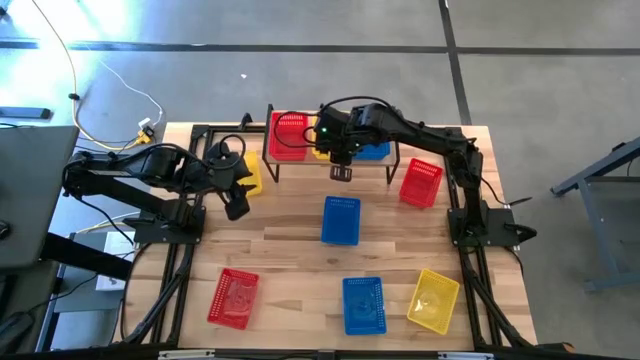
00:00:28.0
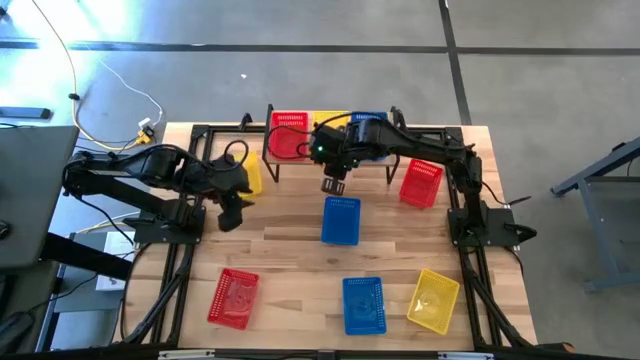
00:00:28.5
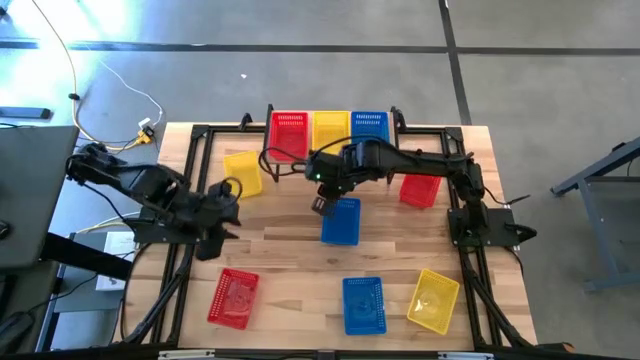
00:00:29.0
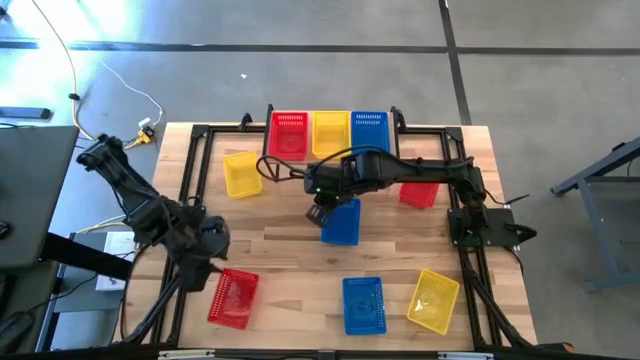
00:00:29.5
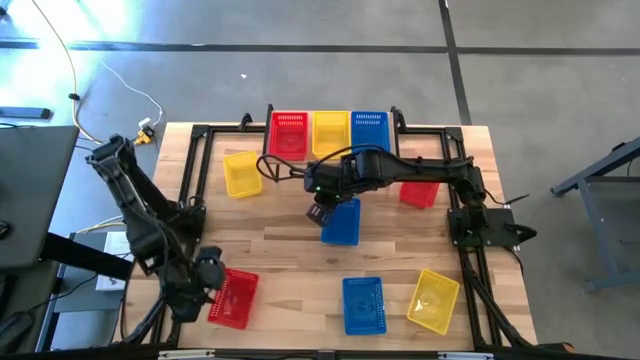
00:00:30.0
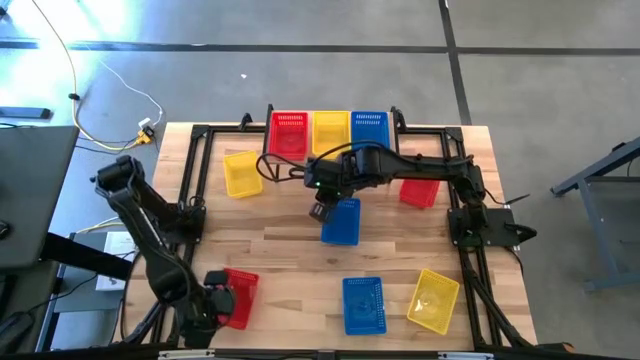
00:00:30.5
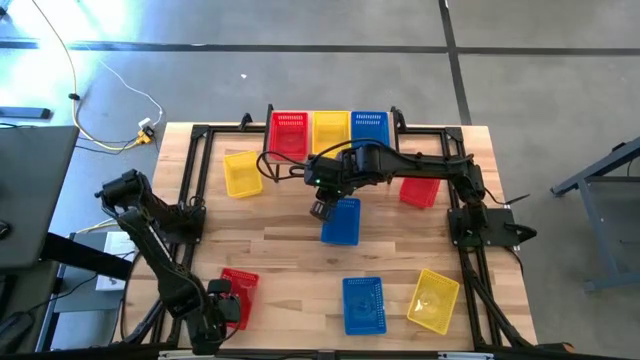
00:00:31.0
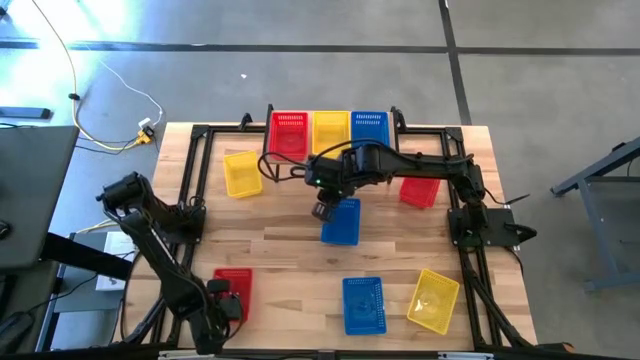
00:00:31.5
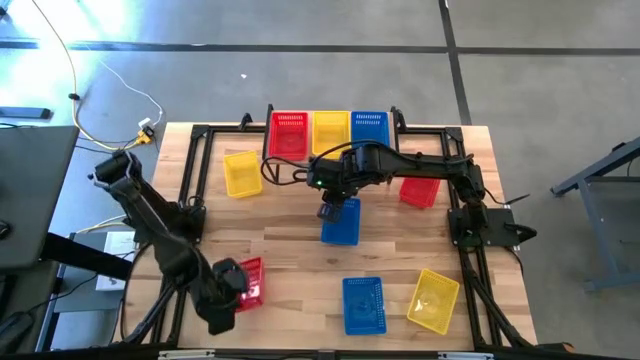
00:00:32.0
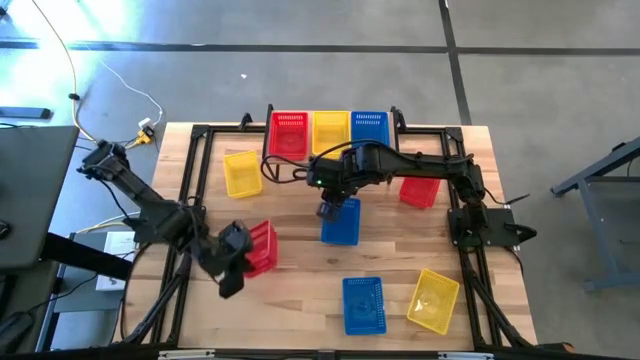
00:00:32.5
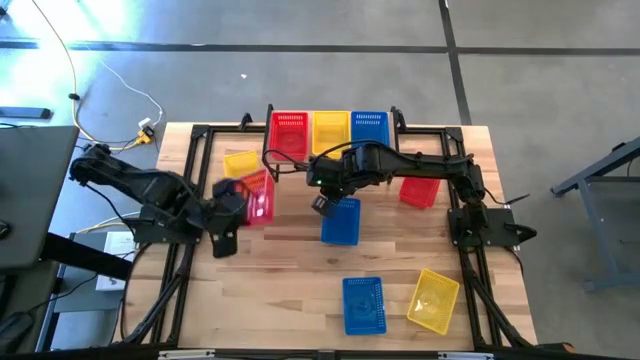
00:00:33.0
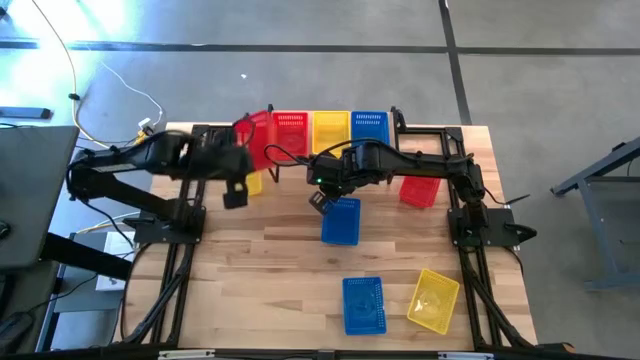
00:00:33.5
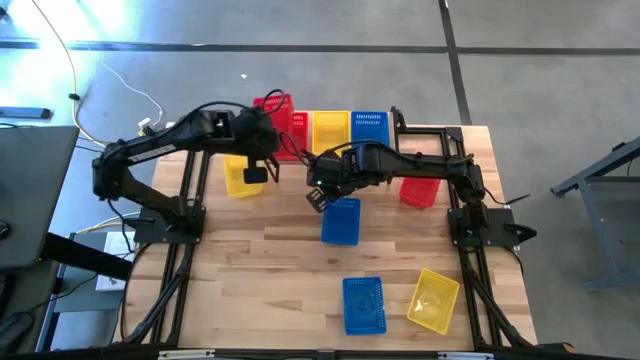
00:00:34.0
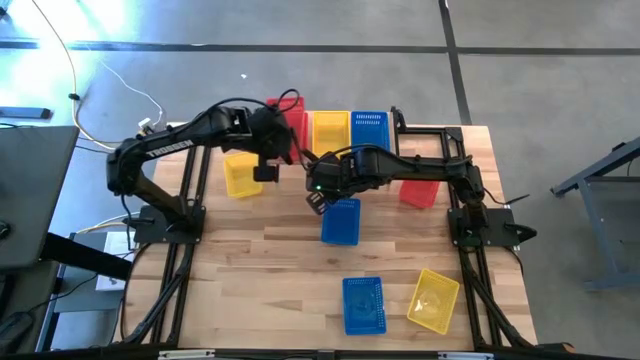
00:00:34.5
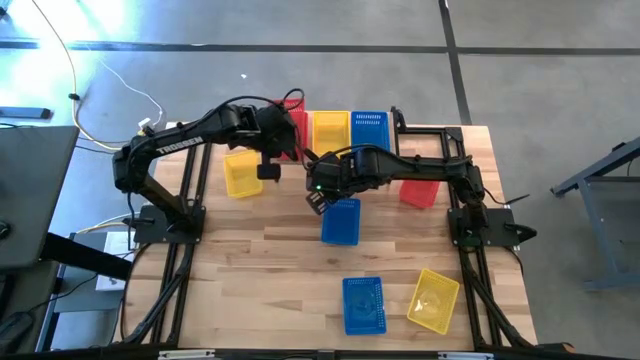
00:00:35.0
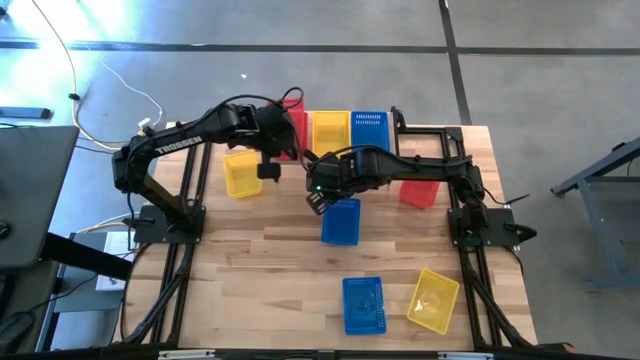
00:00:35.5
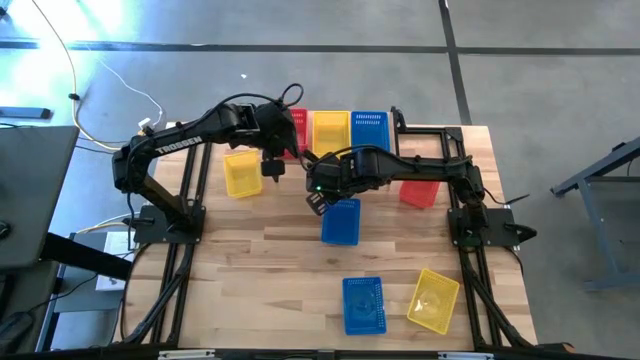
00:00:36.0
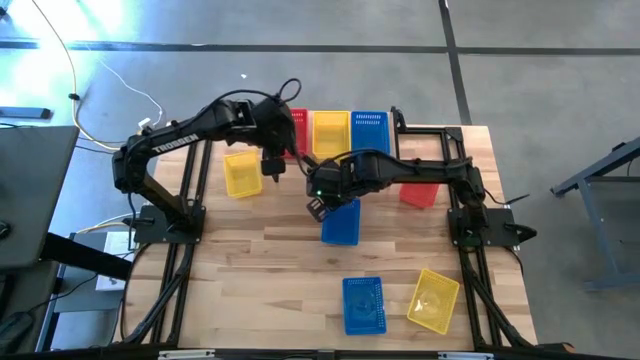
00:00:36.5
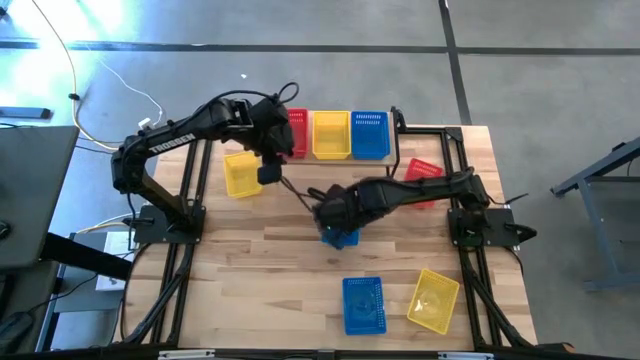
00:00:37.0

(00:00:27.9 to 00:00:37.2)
Task: Stack baskets on shelf by color
Stack the bottom red bin on top of the red bin on the shelf

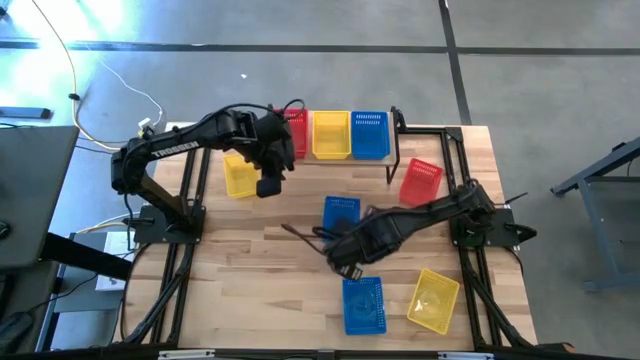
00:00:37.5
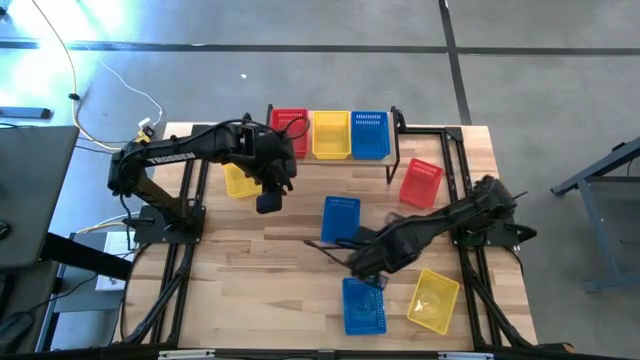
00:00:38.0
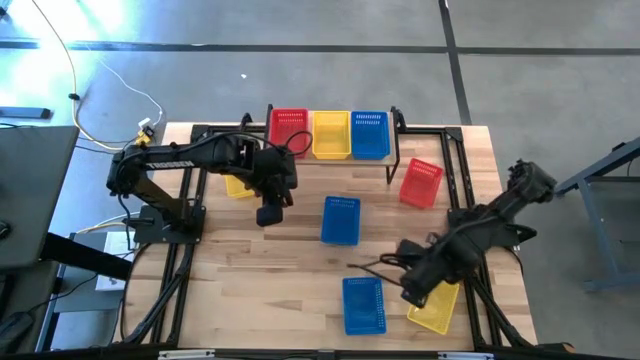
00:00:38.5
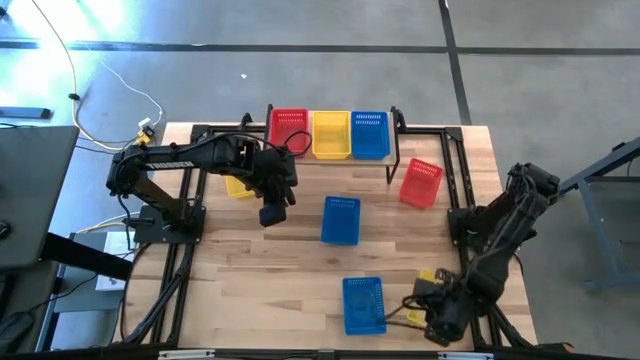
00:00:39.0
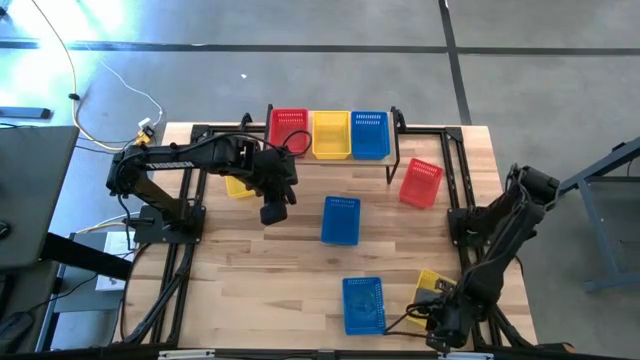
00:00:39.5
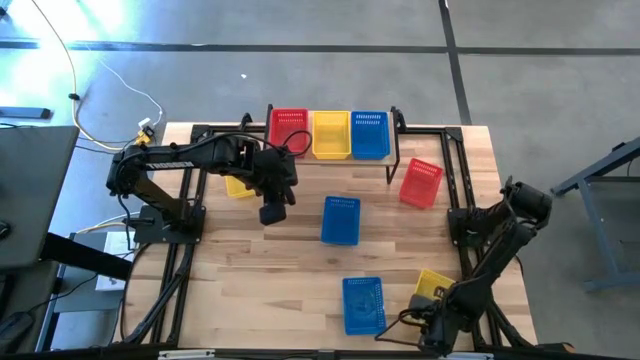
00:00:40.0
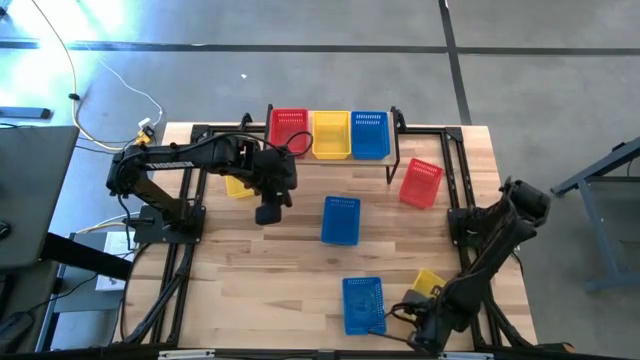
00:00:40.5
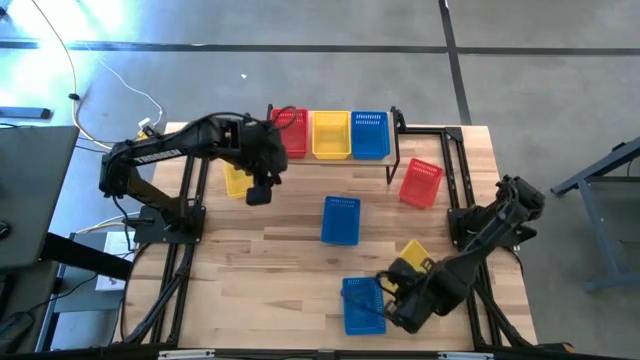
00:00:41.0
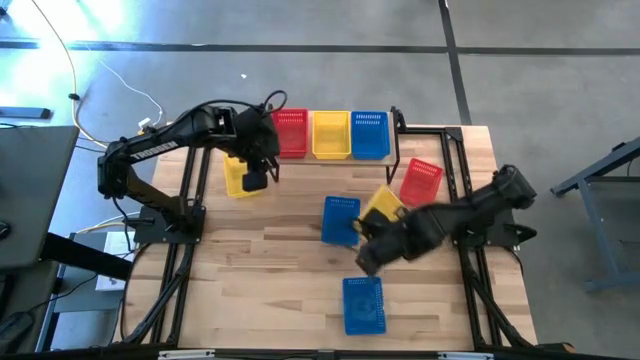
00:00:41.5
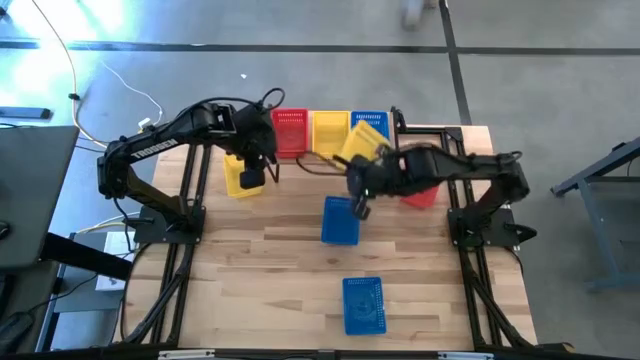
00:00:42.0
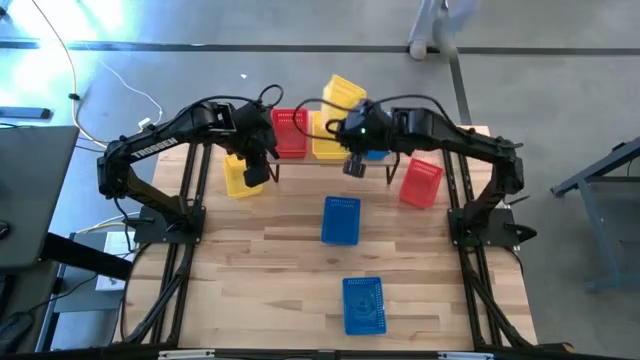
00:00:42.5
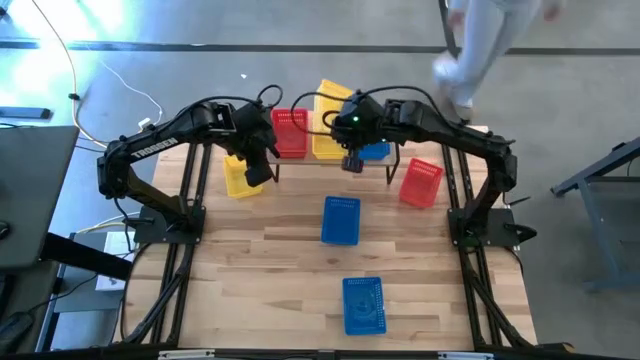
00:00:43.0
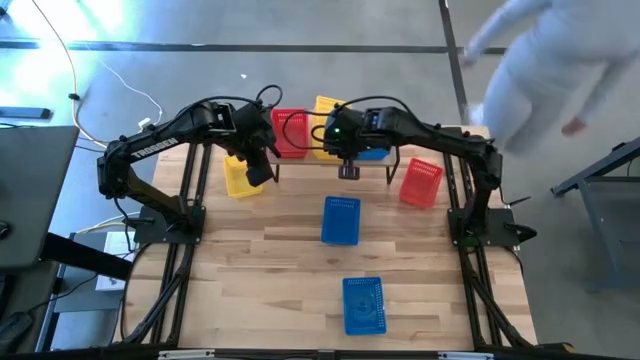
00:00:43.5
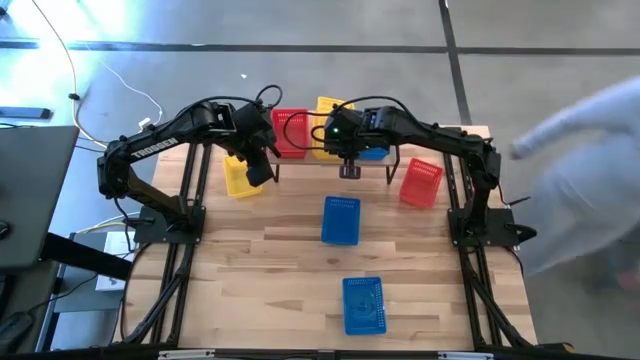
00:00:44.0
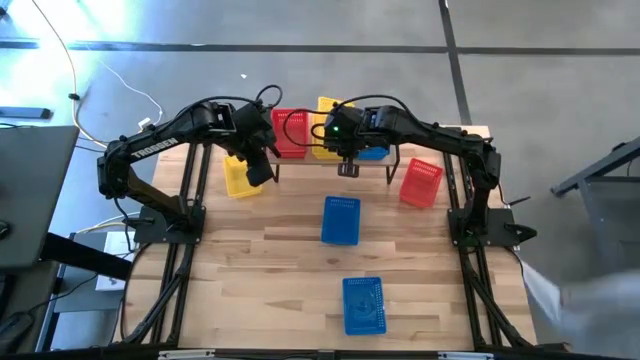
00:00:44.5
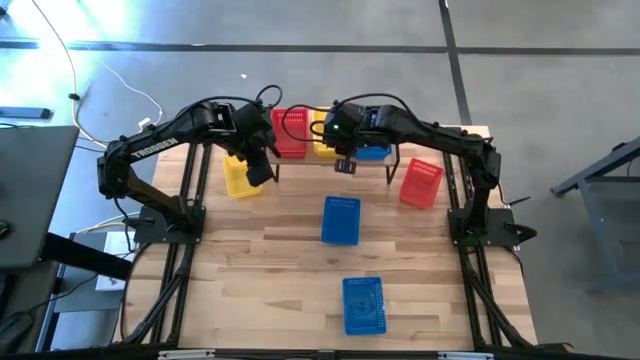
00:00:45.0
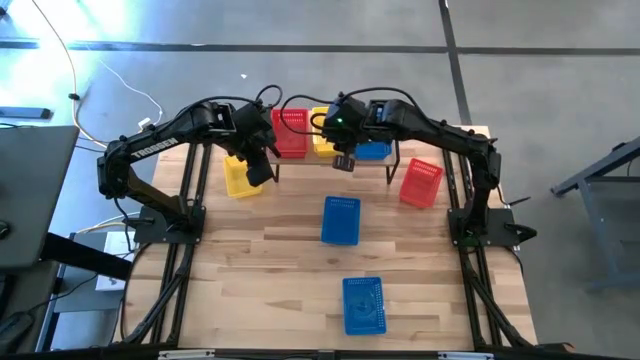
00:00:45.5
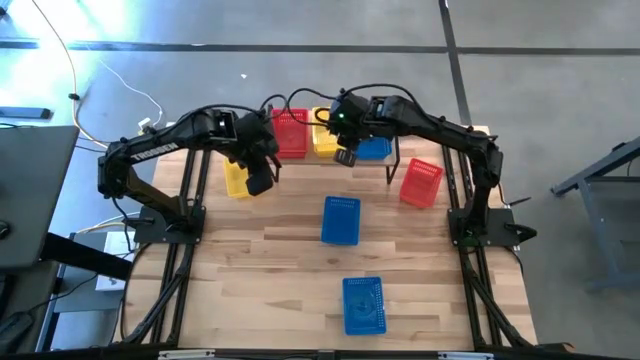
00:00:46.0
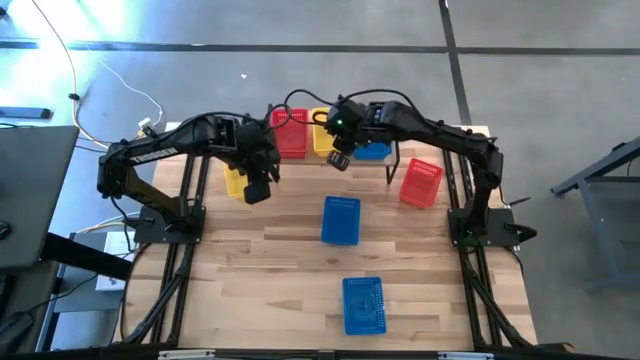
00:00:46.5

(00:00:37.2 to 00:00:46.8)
Stack the bottom yellow bin on top of the yellow bin on the shelf

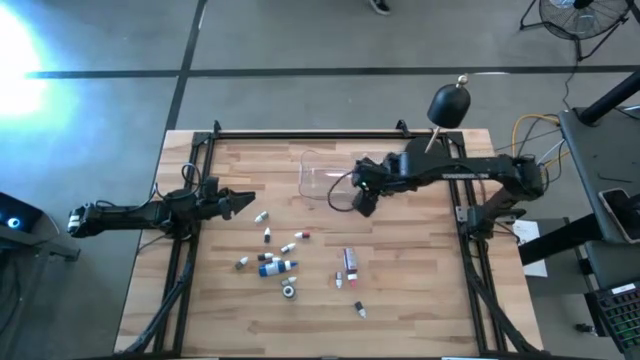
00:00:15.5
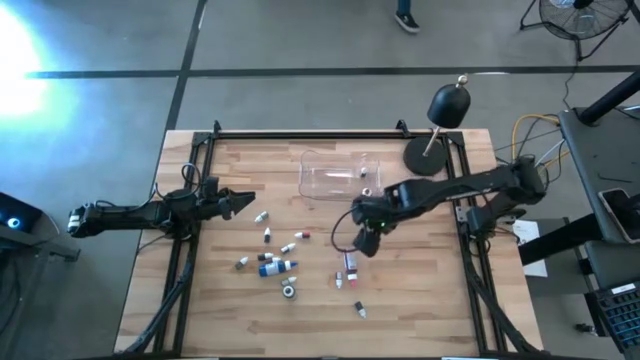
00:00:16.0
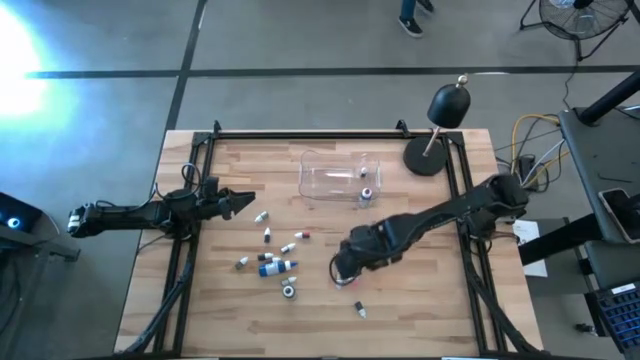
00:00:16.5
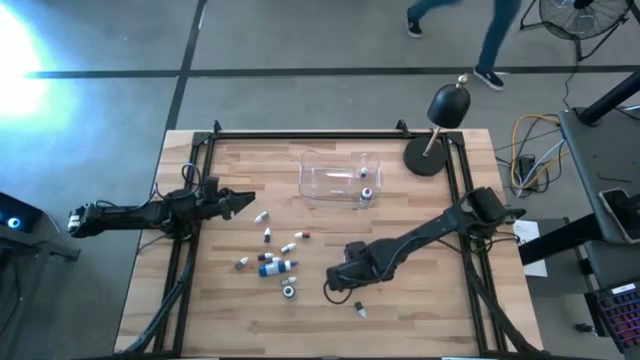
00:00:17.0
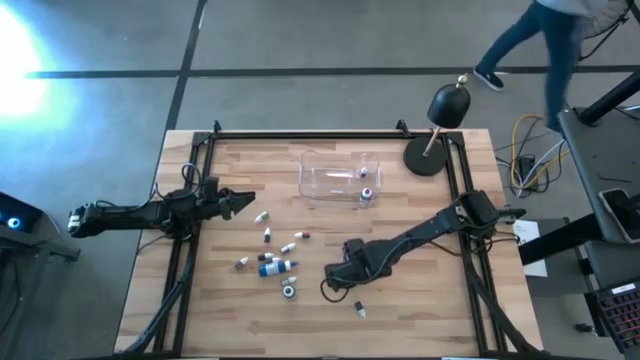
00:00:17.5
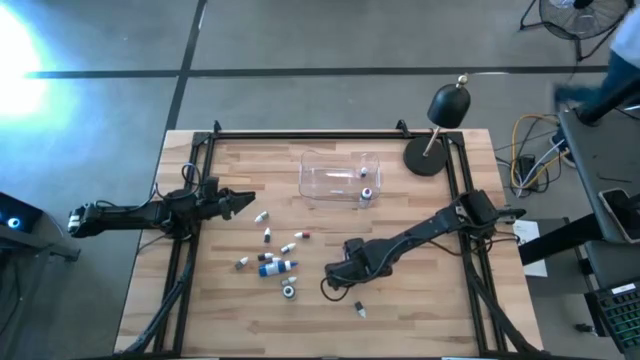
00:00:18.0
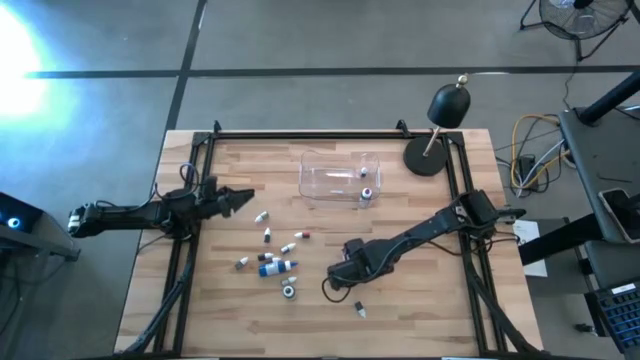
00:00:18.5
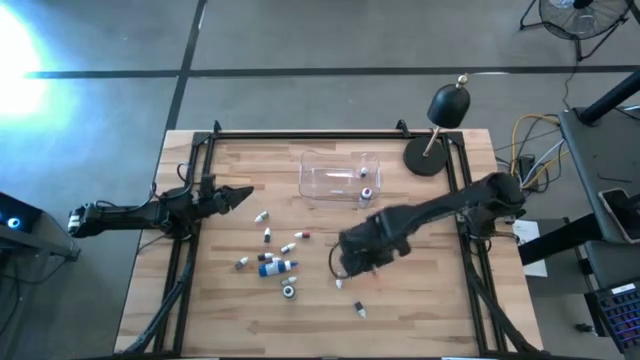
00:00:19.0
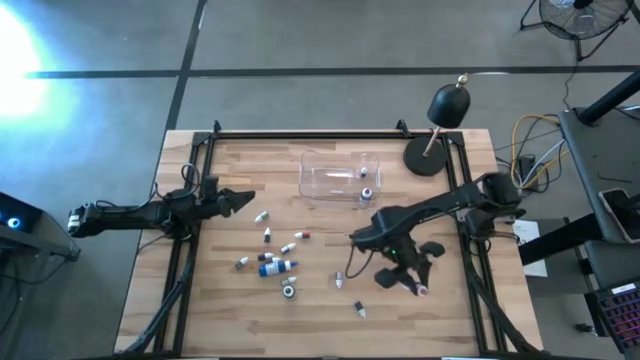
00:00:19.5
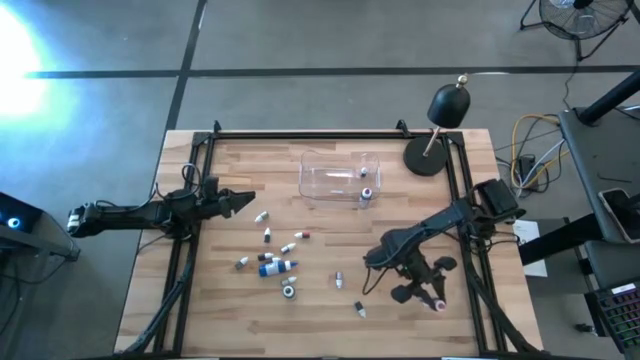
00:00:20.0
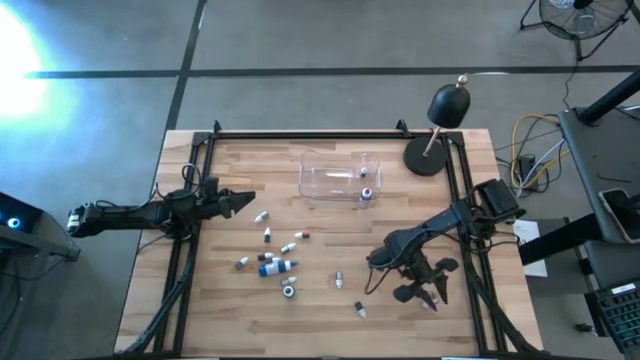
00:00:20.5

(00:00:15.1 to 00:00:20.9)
Task: Pick & Place food coloring
Put the big pink food coloring bottle into the transparent bin
